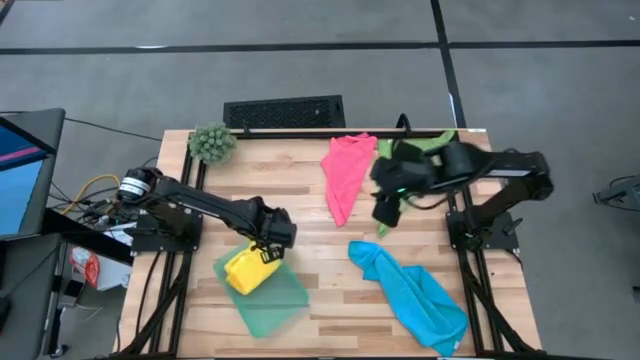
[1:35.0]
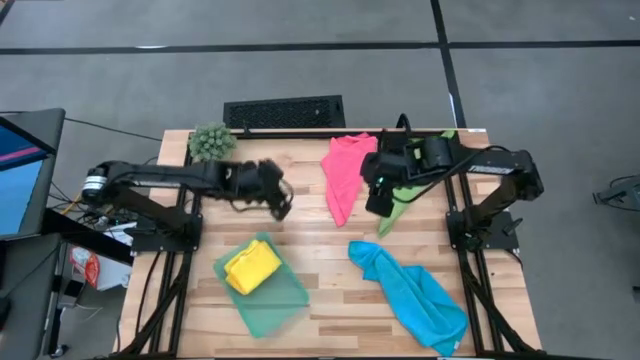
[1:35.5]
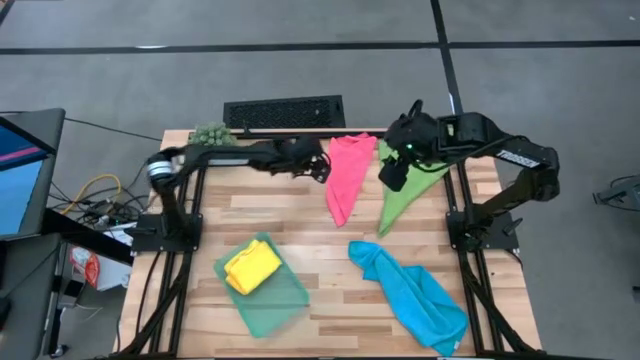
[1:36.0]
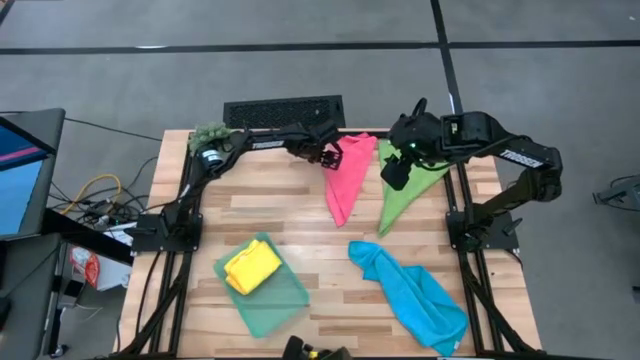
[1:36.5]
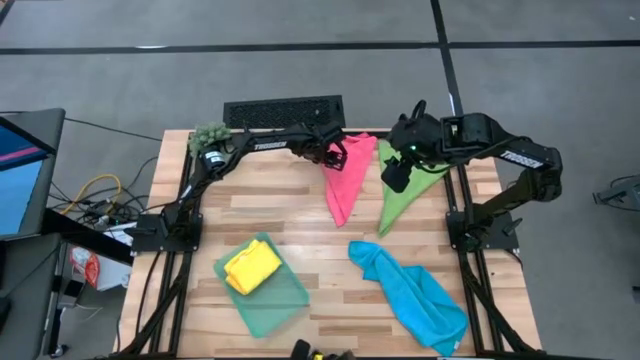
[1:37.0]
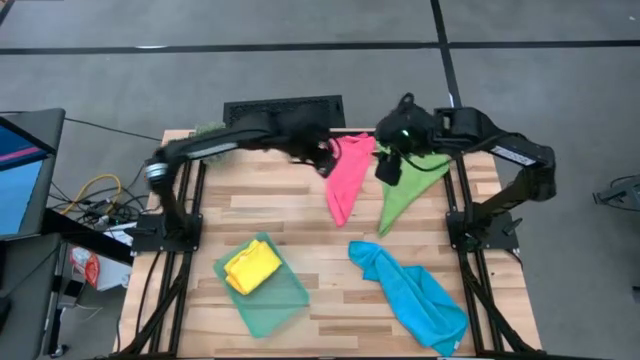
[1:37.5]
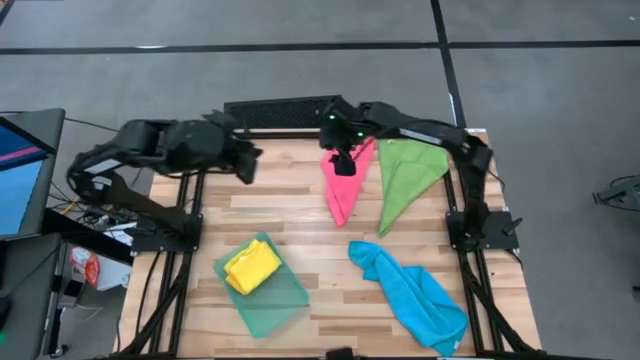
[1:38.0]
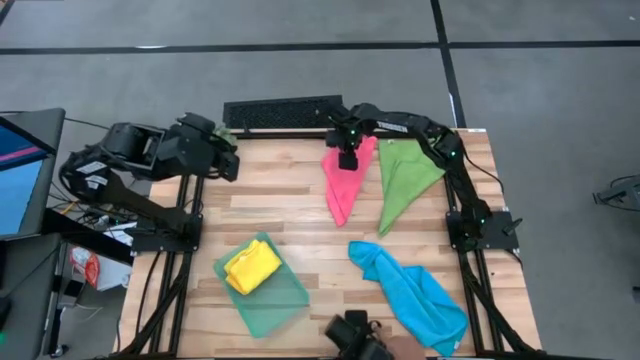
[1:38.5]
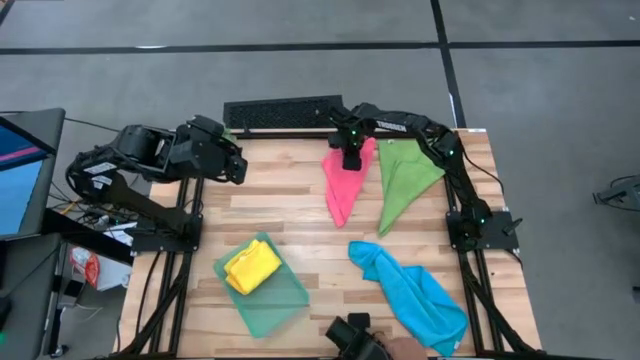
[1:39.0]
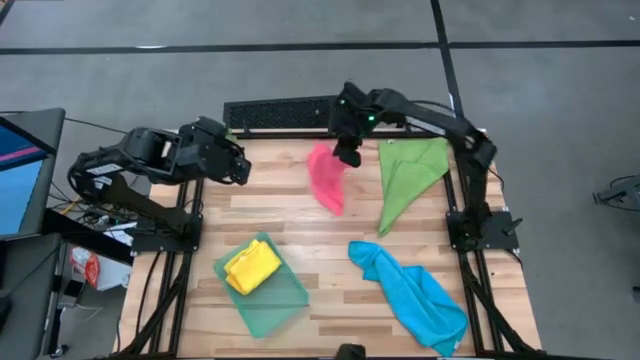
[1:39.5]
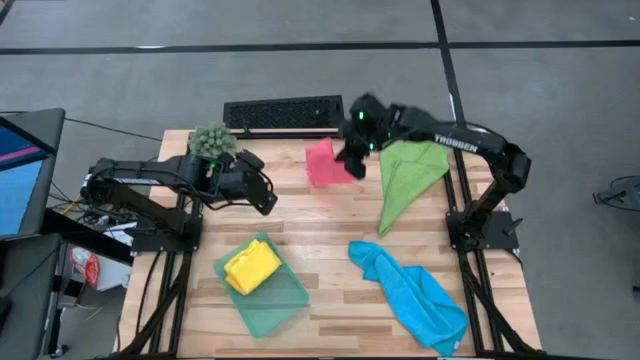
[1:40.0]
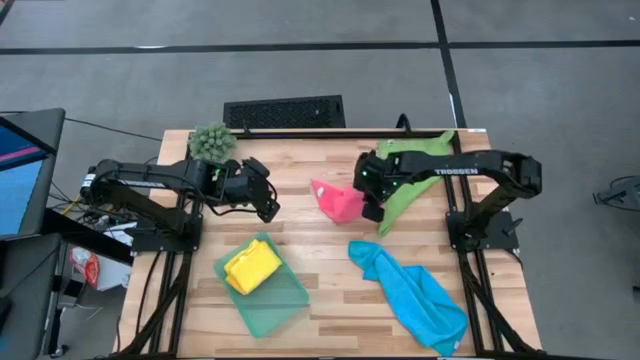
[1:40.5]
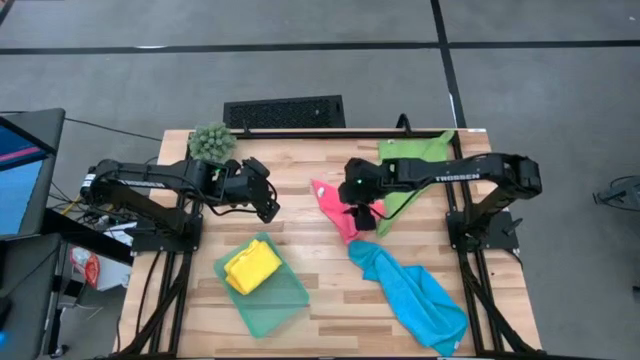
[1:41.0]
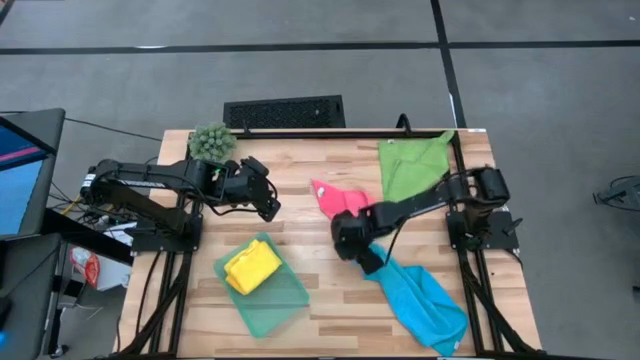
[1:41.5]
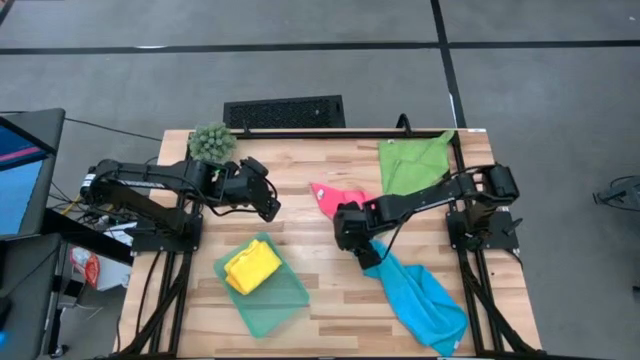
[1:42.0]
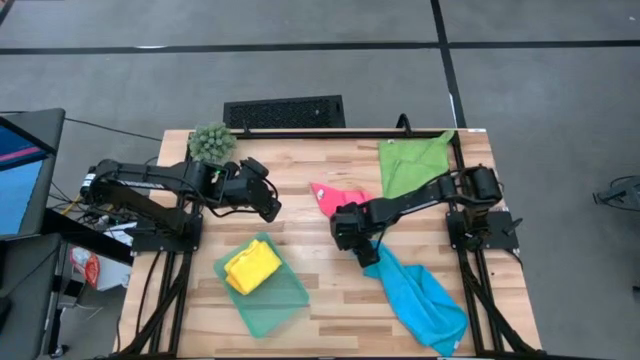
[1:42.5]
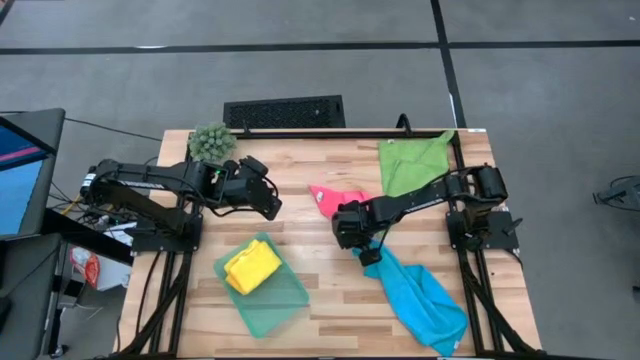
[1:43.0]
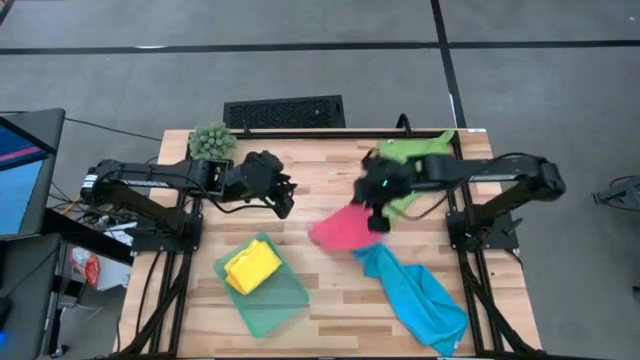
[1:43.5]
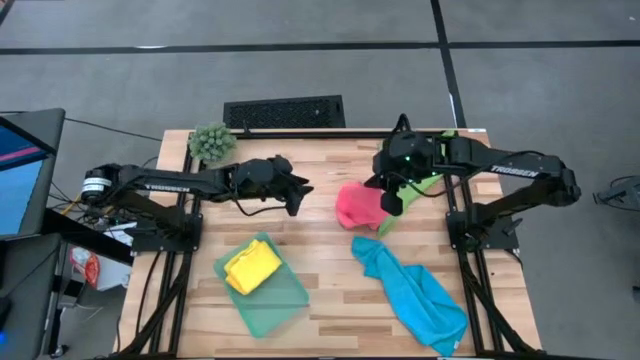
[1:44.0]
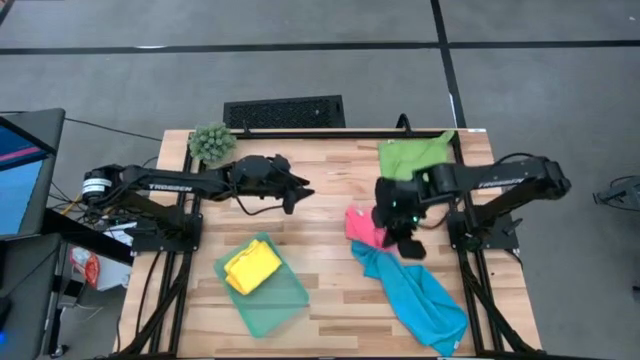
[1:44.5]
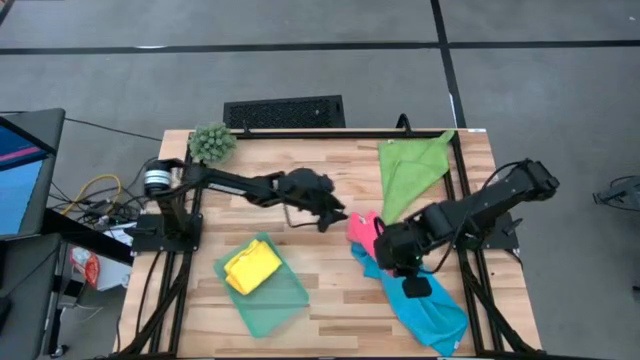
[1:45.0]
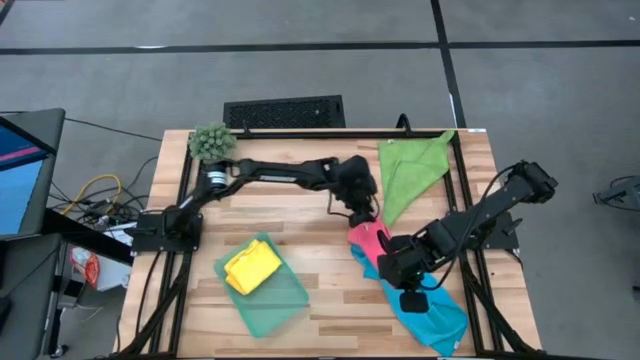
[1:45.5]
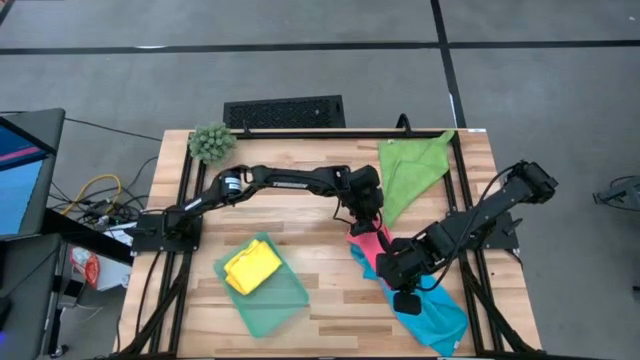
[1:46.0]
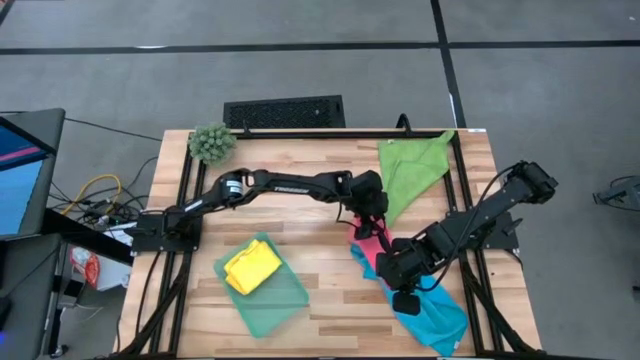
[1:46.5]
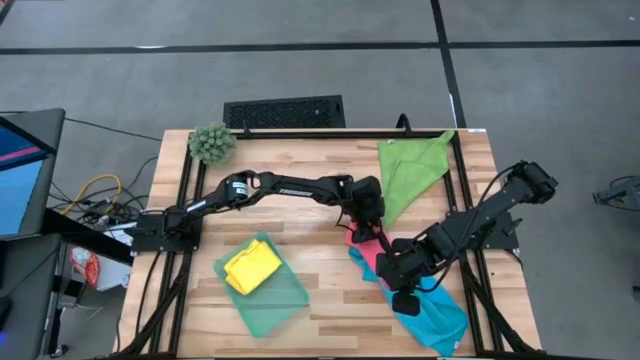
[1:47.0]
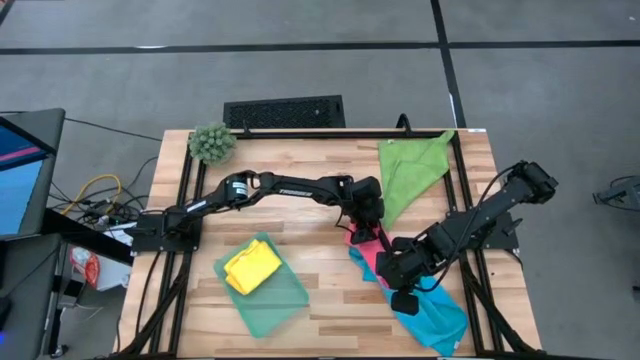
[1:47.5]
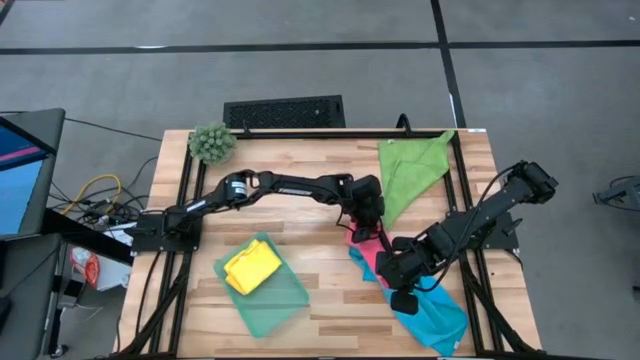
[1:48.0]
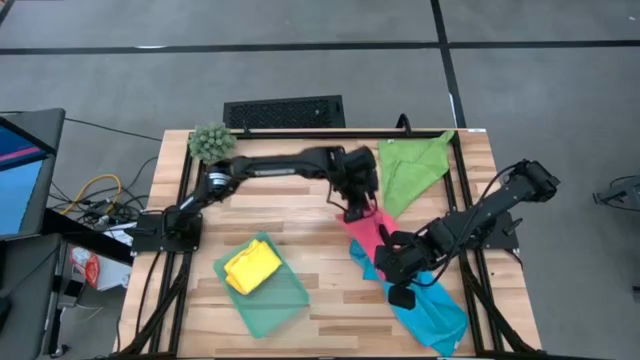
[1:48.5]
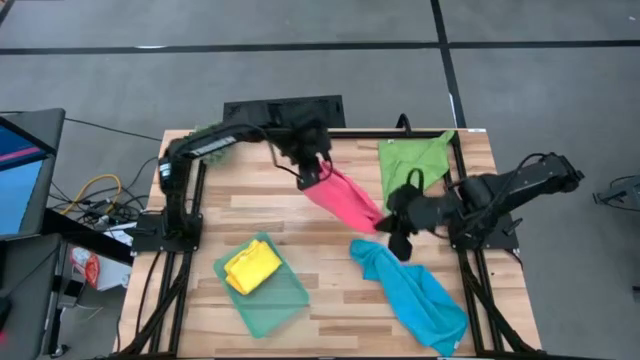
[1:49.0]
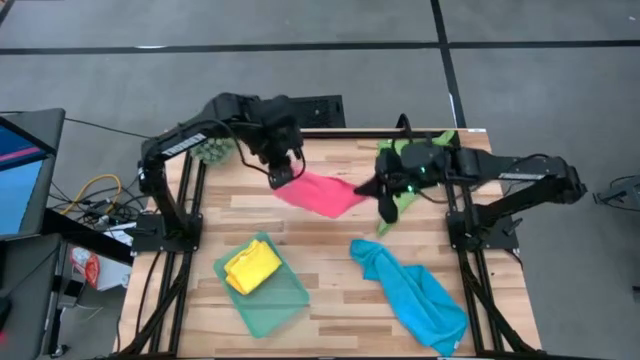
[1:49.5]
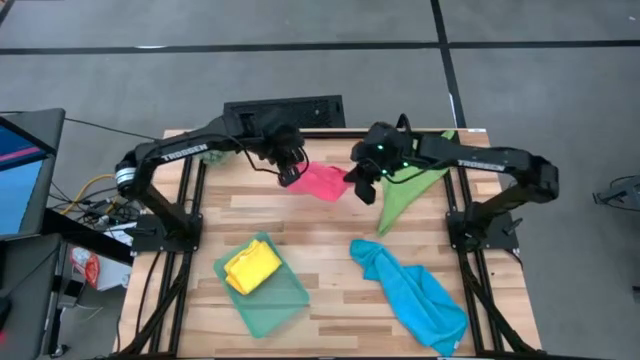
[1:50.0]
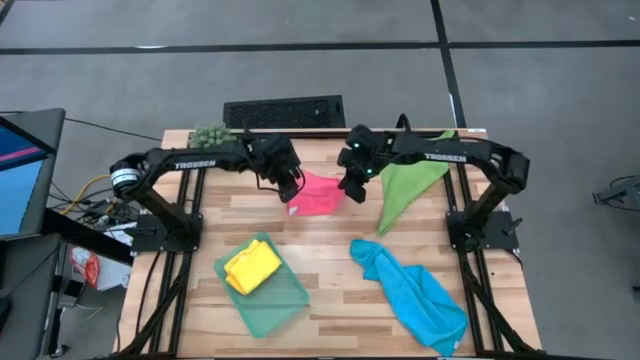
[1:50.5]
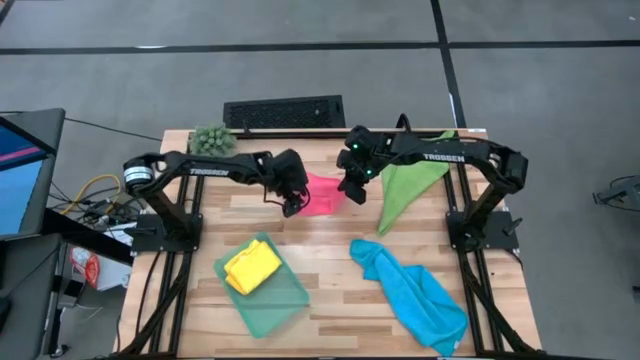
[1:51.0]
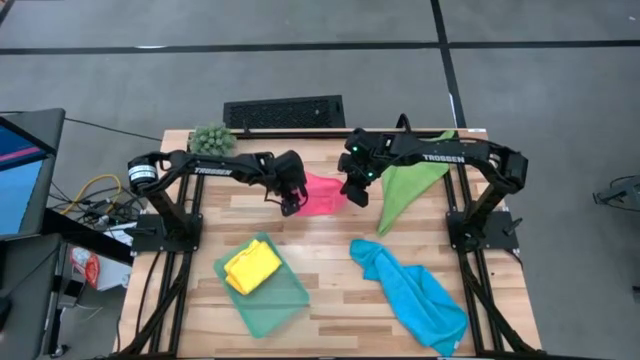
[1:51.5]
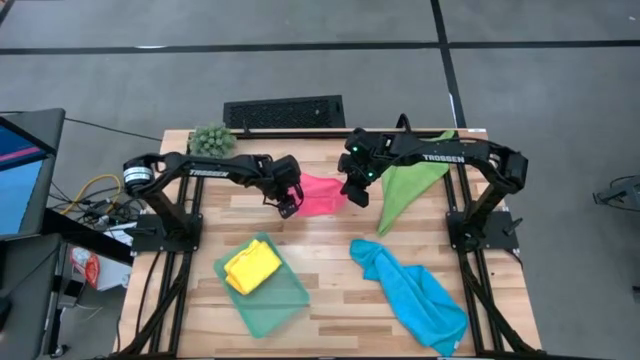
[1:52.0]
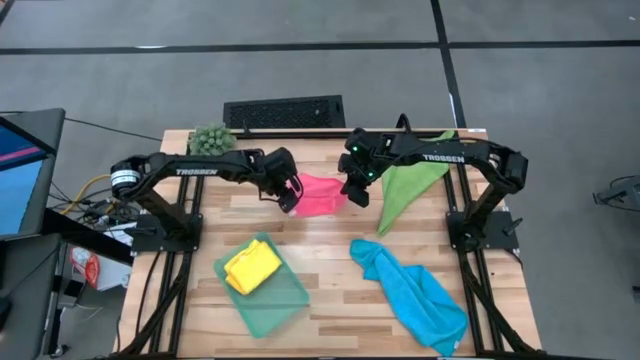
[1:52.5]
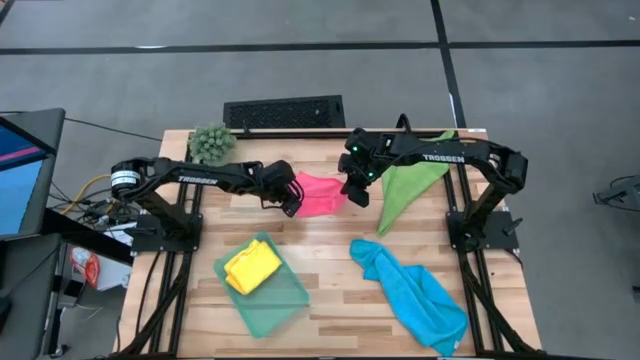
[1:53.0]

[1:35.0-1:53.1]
Task: Fold microfiber towels
Fold the pink towel
